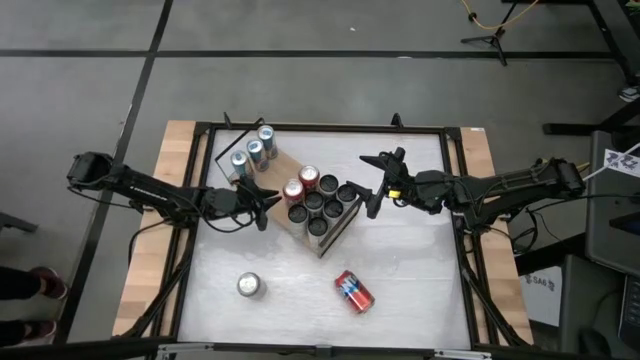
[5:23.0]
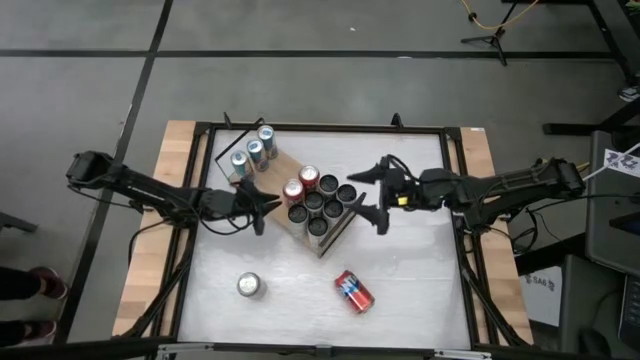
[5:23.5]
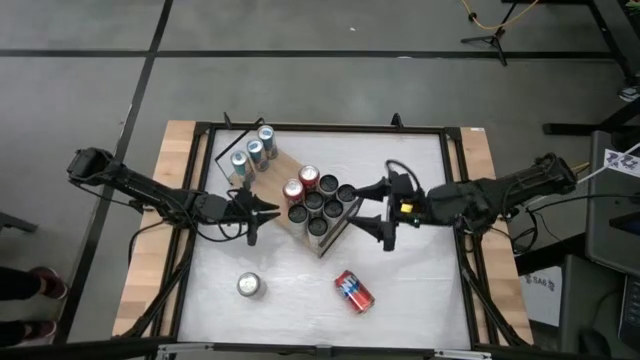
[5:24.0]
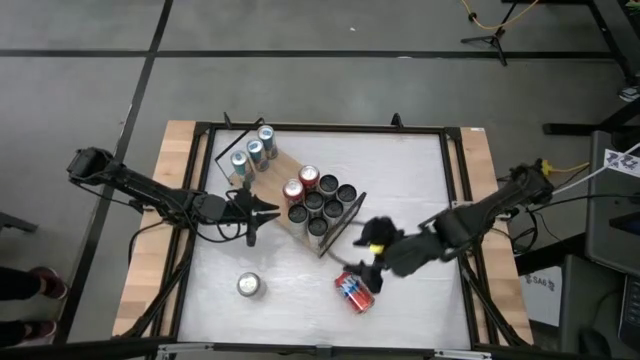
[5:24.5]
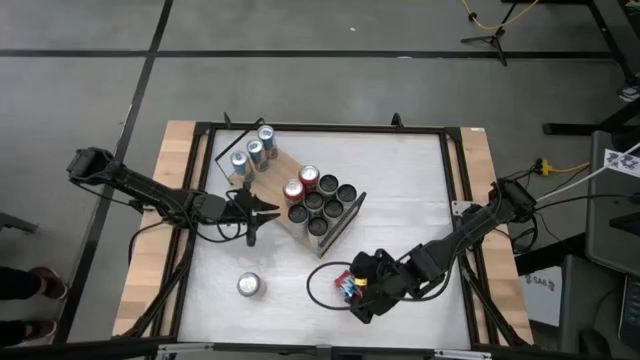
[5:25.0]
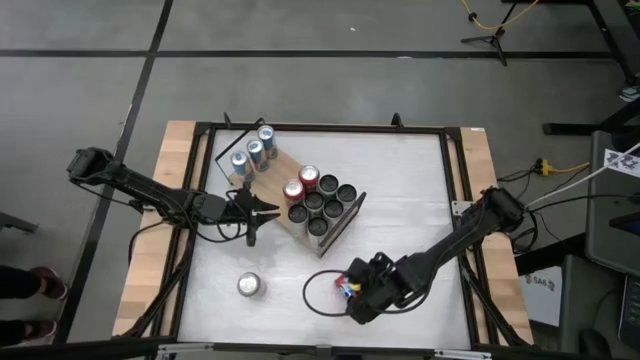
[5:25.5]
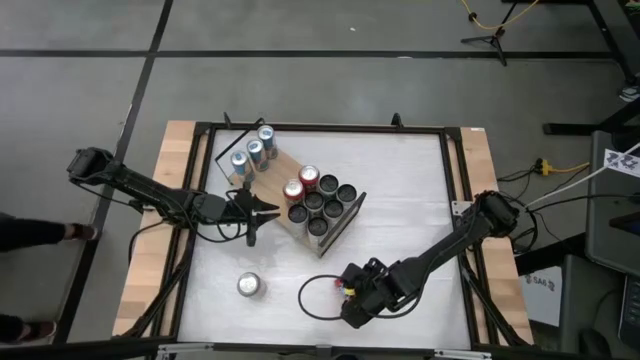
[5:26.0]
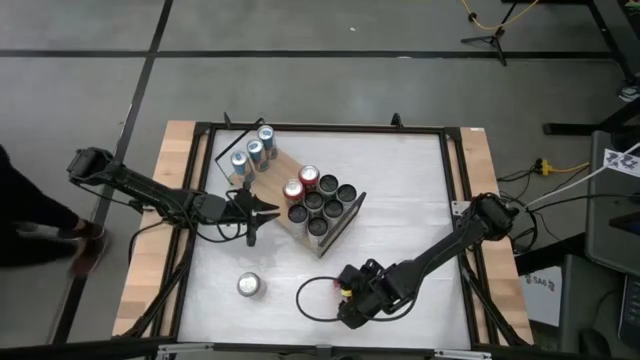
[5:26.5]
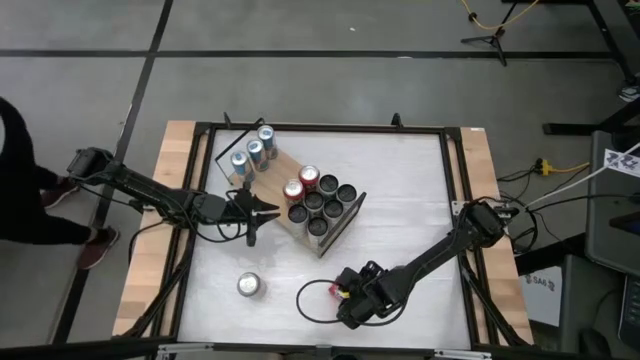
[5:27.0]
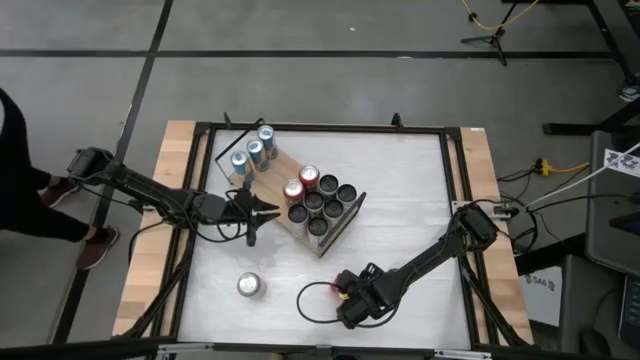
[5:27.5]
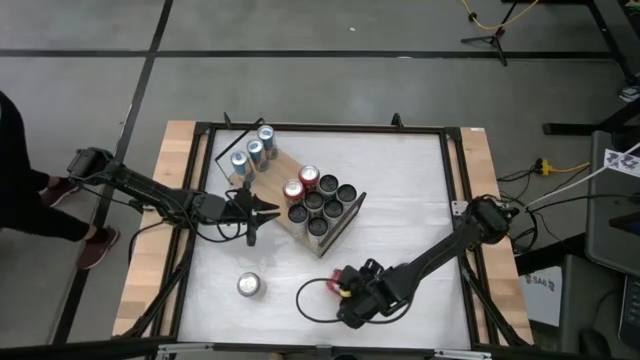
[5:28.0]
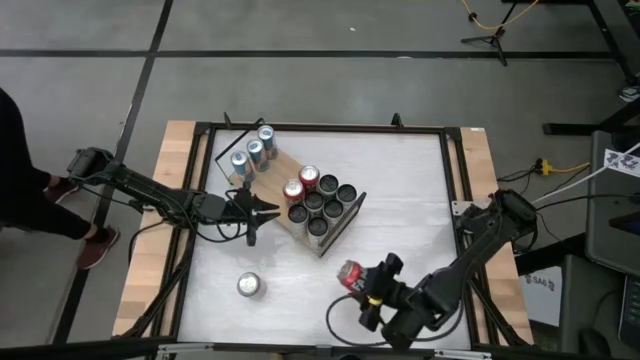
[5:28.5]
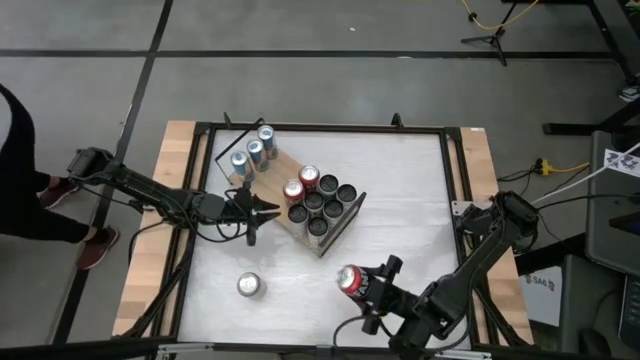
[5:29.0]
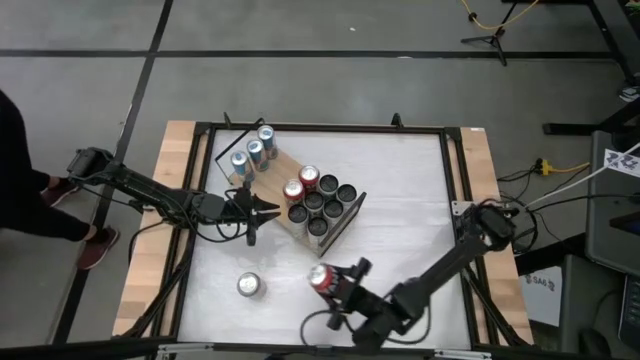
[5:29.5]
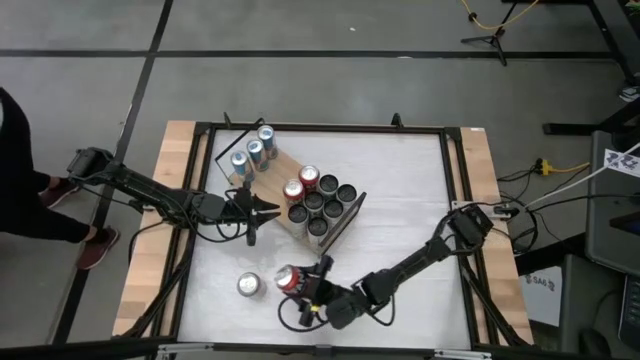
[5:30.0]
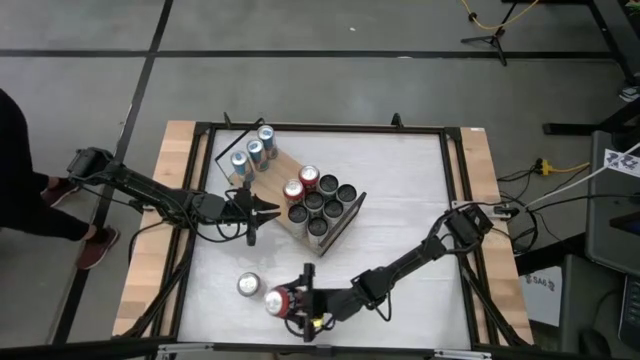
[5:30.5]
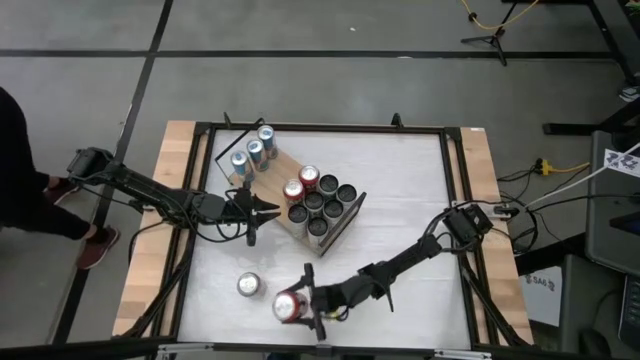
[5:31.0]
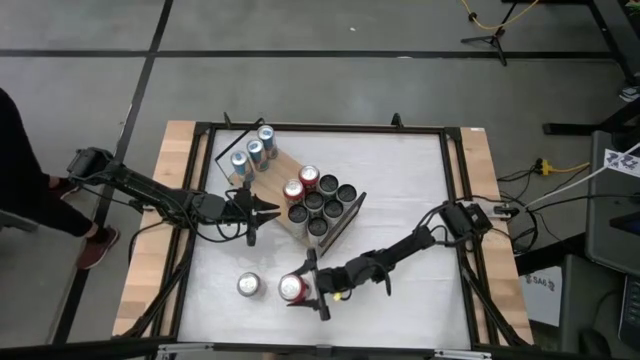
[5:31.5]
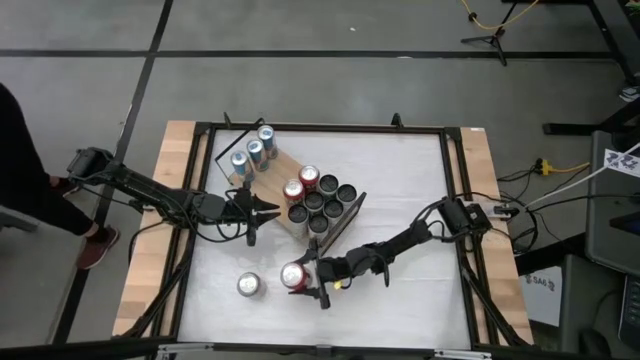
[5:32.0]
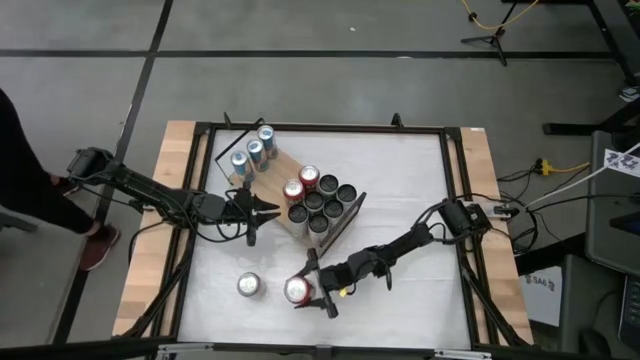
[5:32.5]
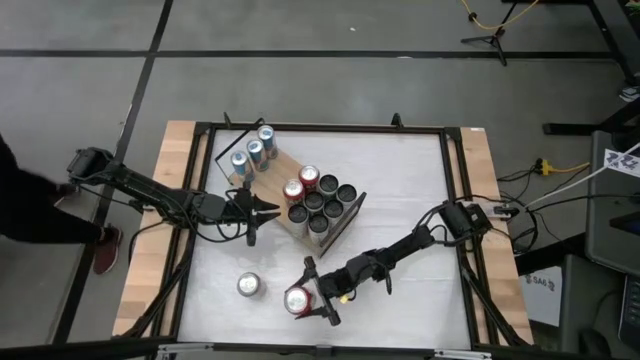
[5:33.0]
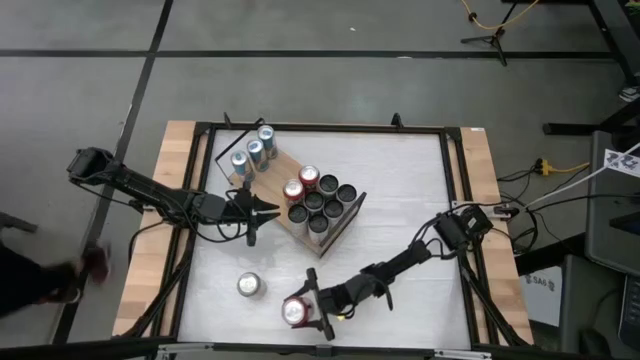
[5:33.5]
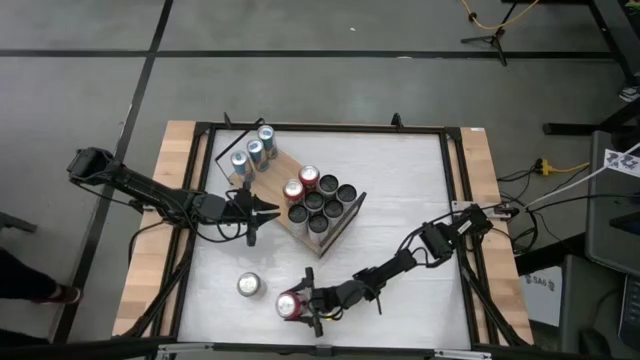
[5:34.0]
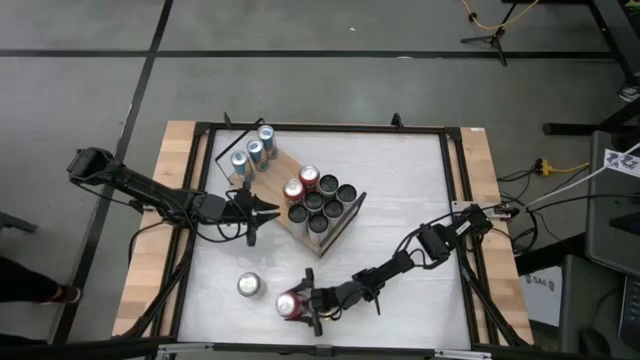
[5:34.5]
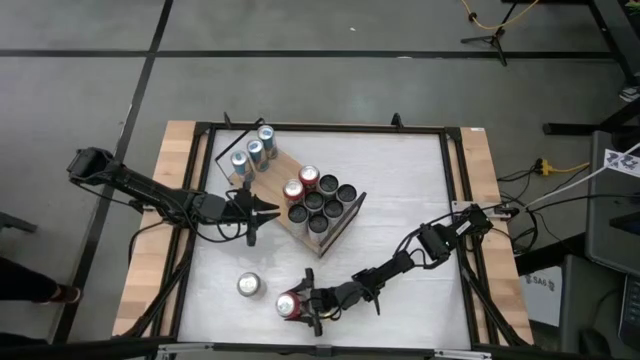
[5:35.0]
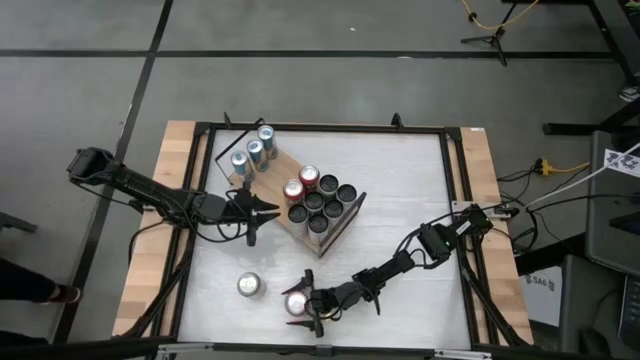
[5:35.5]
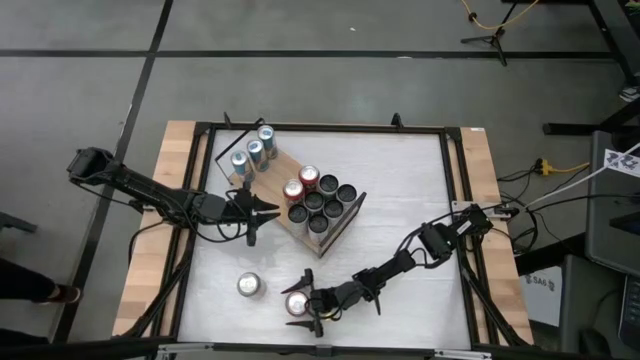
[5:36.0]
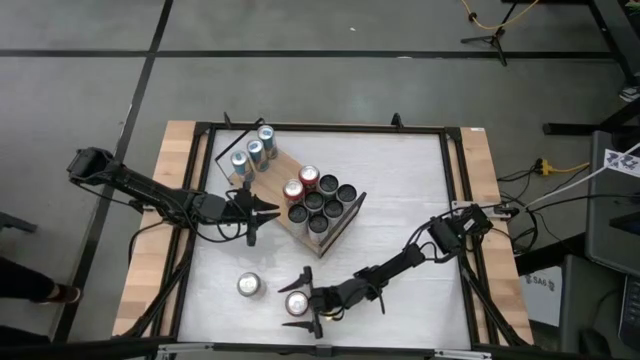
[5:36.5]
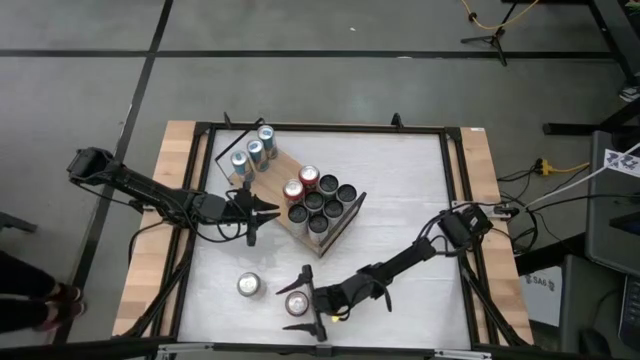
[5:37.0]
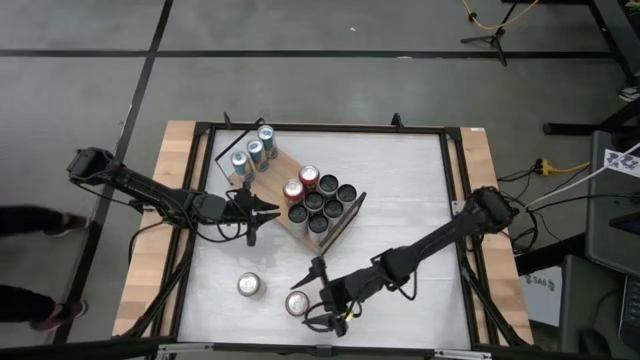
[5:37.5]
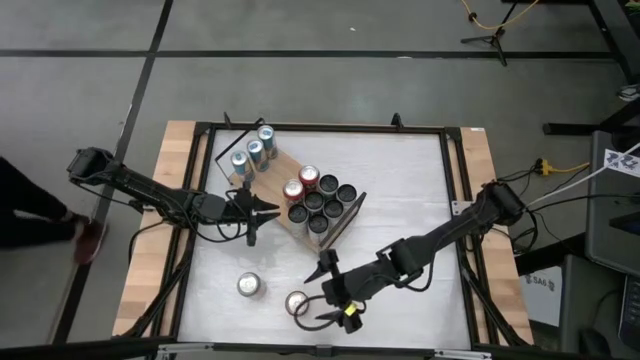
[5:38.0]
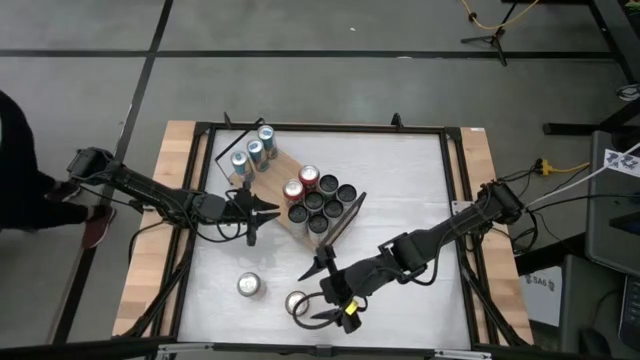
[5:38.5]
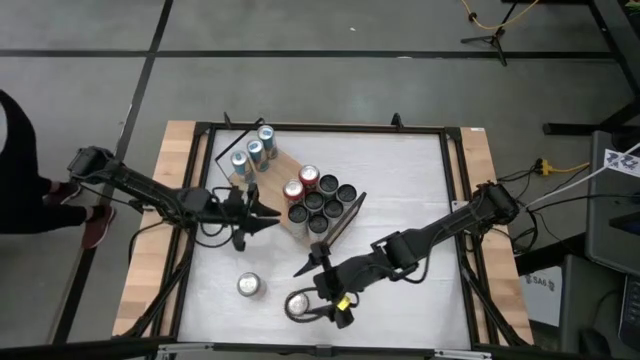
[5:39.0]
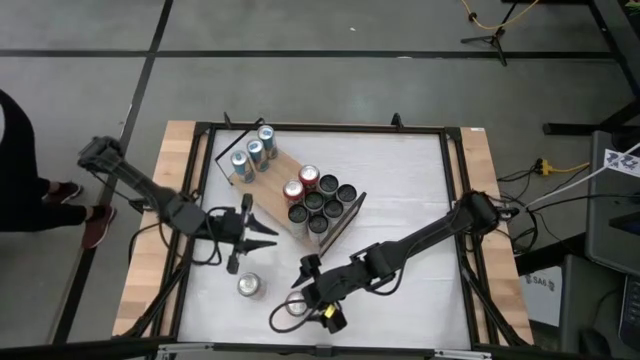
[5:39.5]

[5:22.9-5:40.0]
Task: Place canned beverage on shelf
Put the red soda can on the shelf aligned with the other red soda cans
